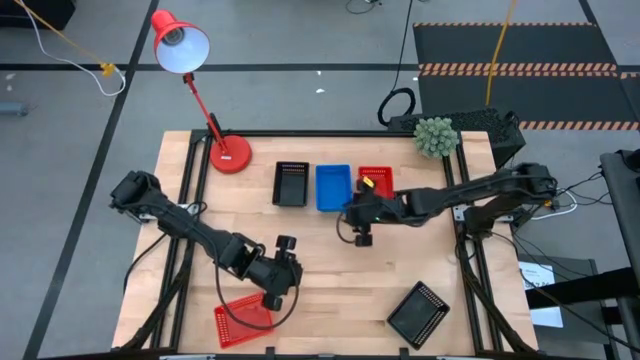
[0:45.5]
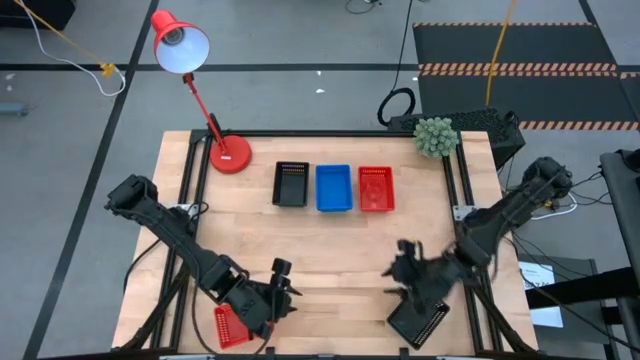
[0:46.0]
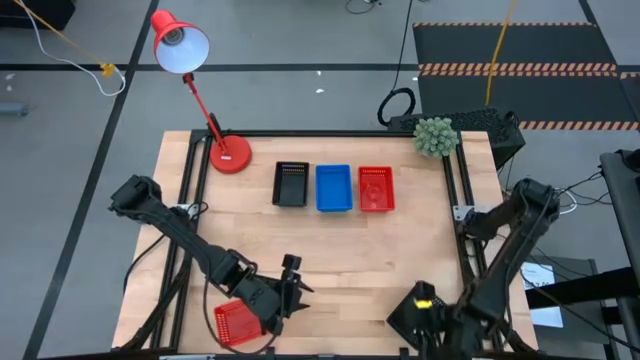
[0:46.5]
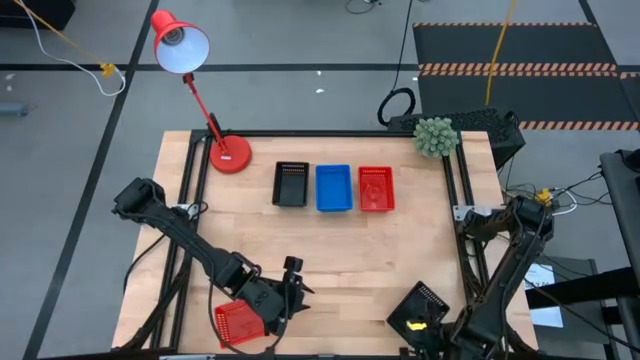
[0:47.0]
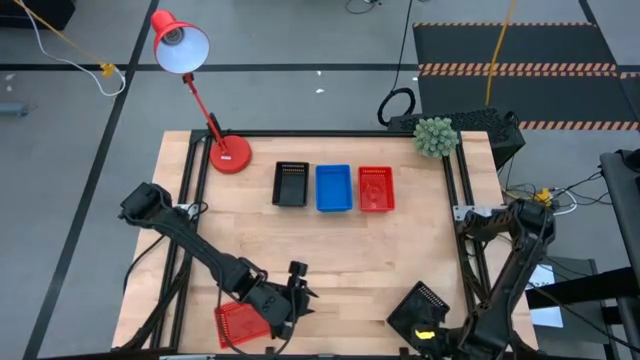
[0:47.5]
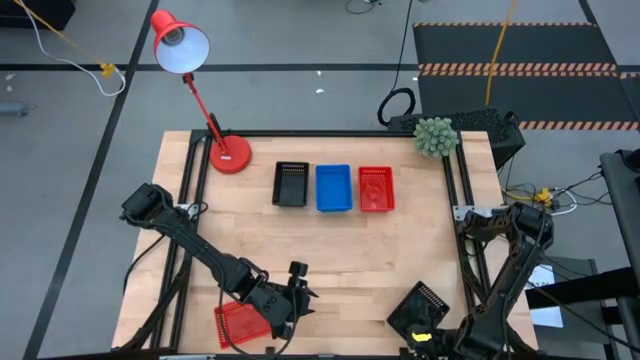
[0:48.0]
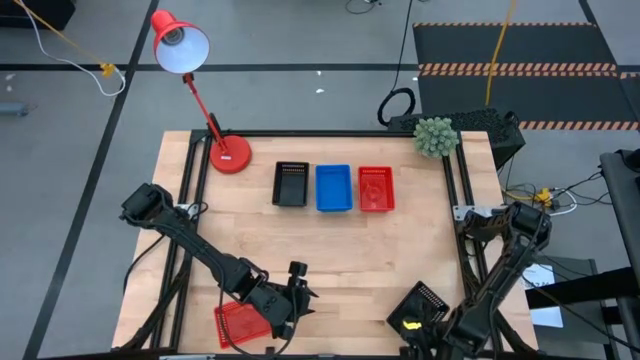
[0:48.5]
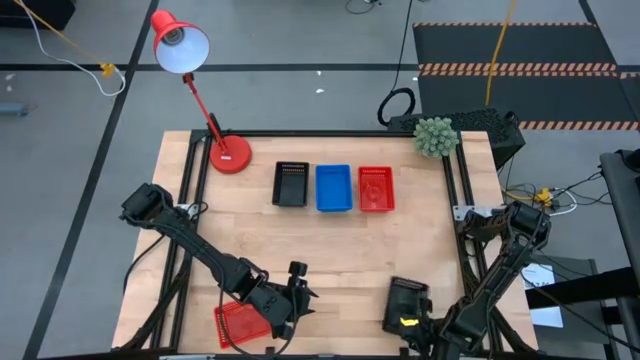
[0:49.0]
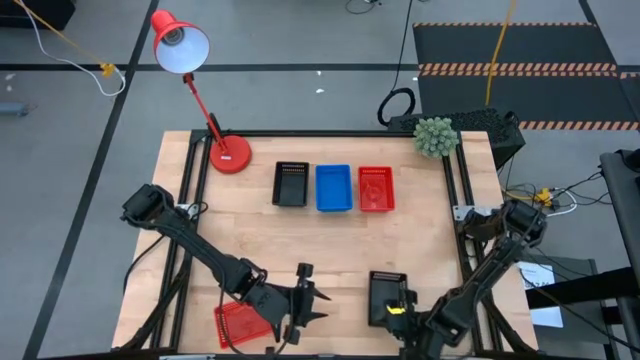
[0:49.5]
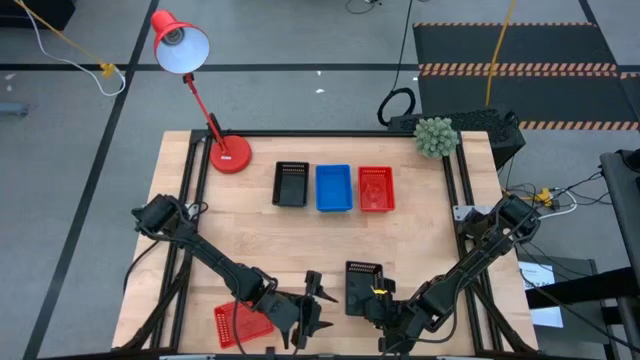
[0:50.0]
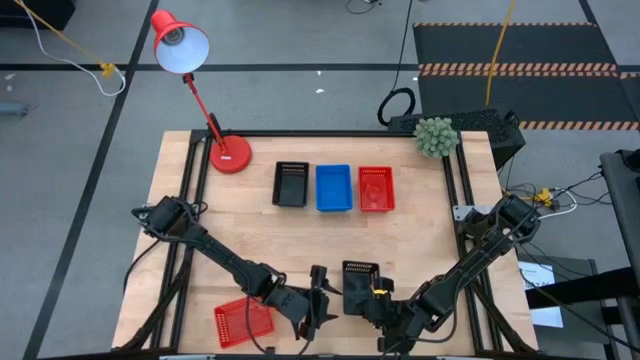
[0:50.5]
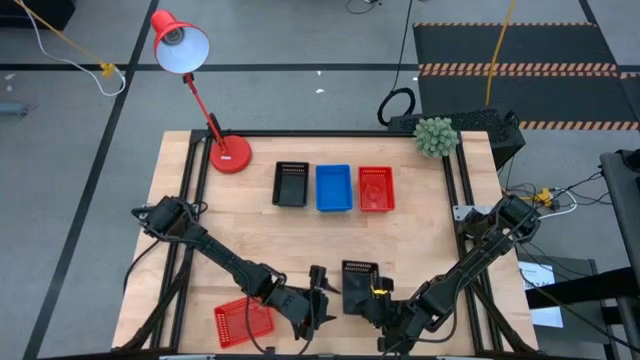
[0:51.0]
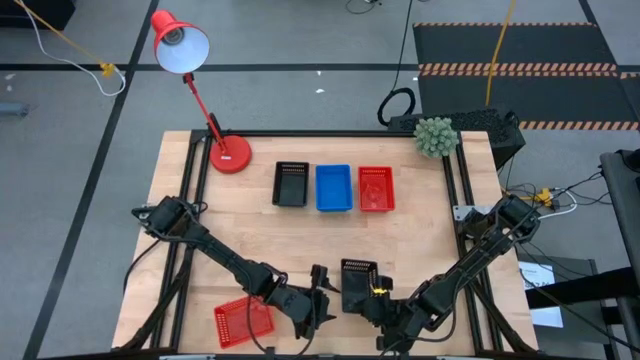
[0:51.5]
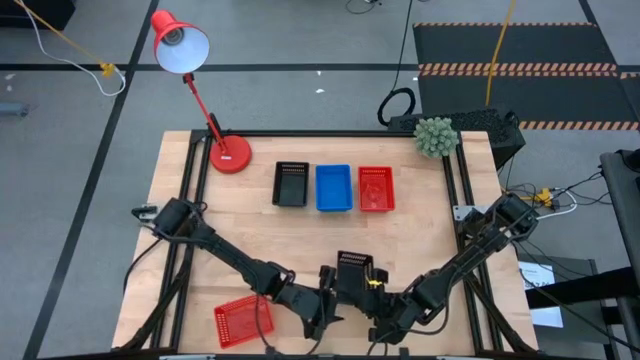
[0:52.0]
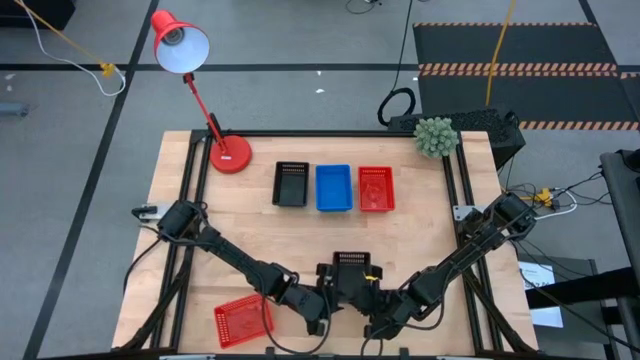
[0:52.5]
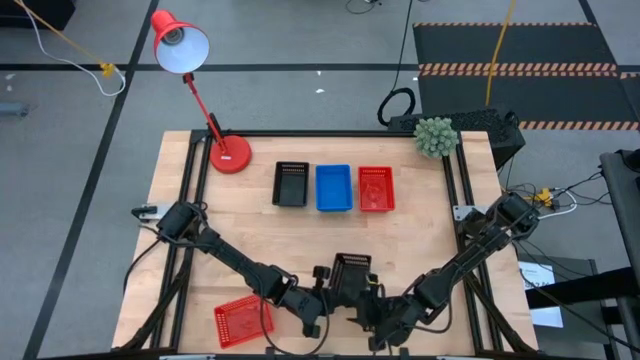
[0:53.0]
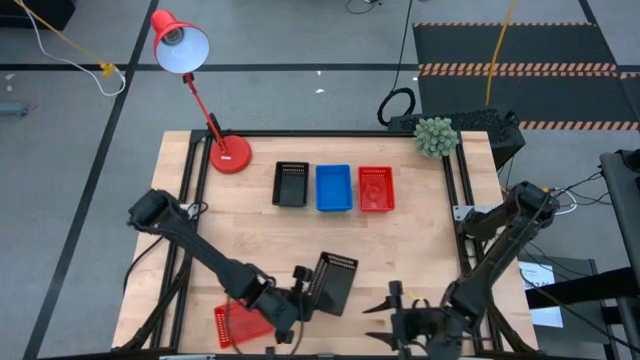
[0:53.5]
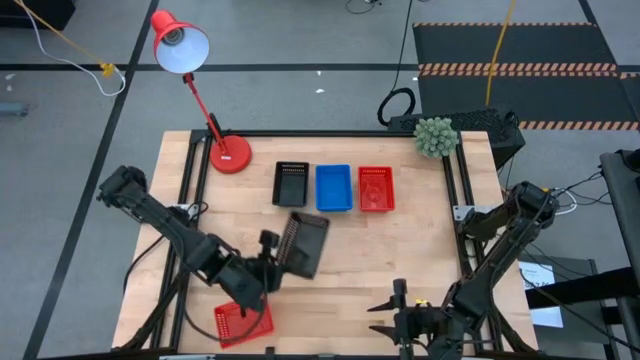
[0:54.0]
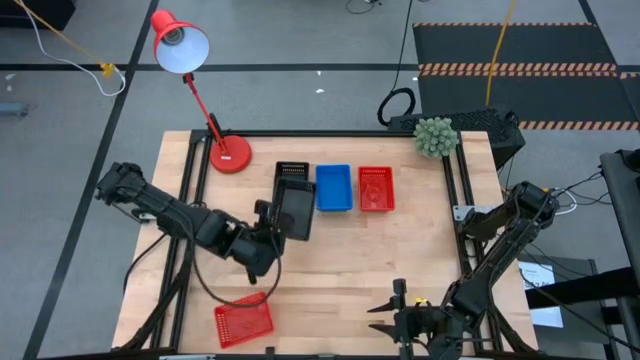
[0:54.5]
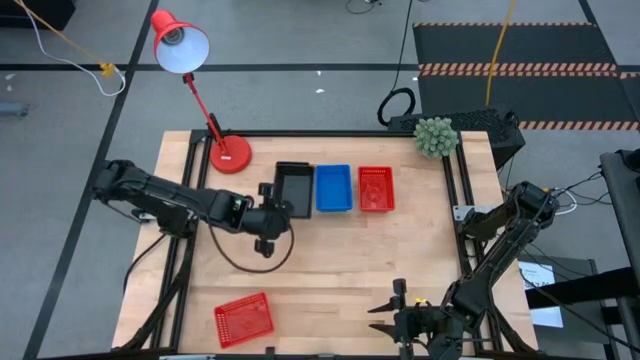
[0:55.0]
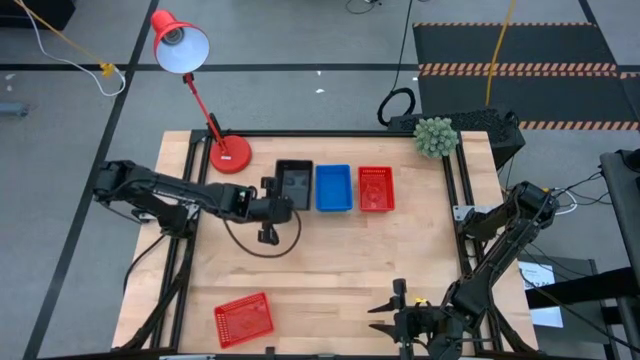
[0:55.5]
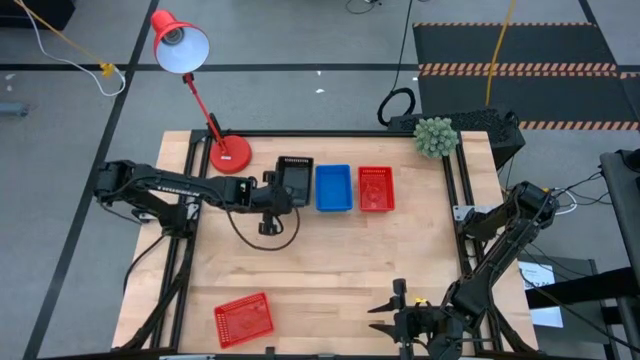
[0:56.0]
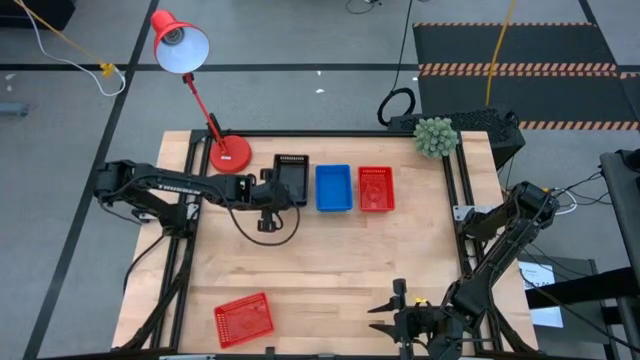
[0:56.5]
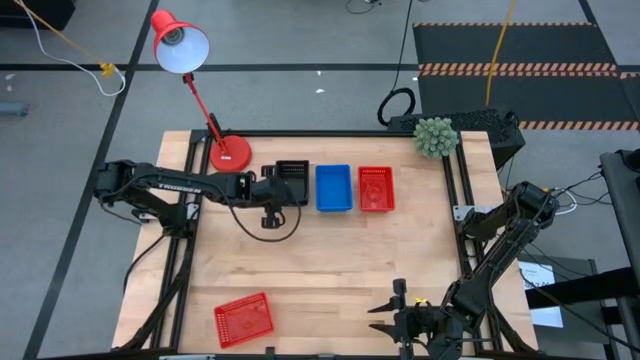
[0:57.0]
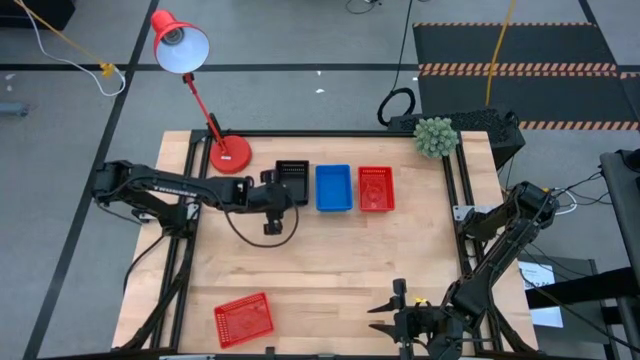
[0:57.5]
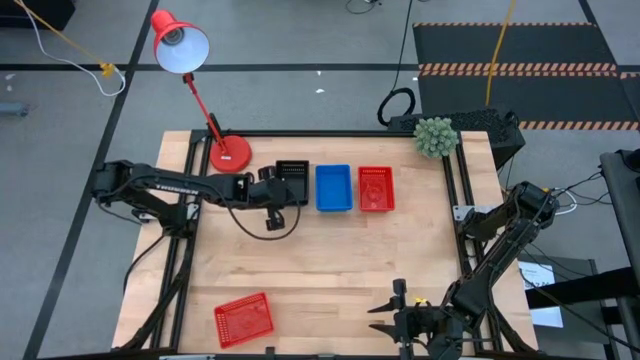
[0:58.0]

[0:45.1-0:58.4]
Stack the black bin on the stacked black bins

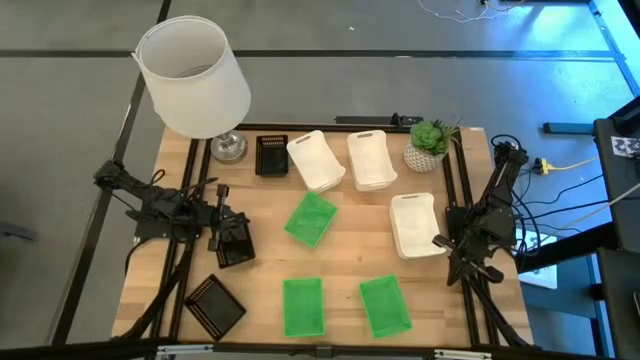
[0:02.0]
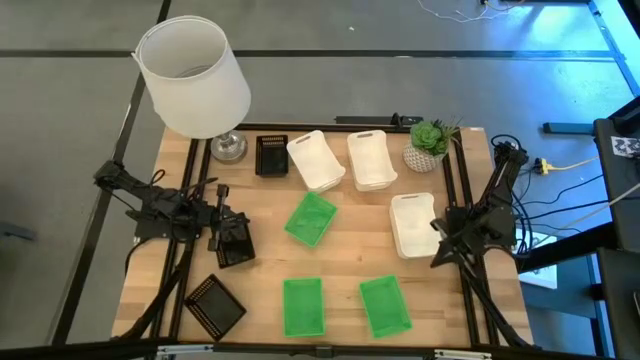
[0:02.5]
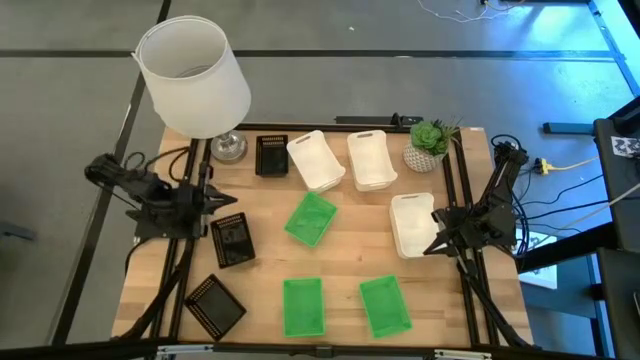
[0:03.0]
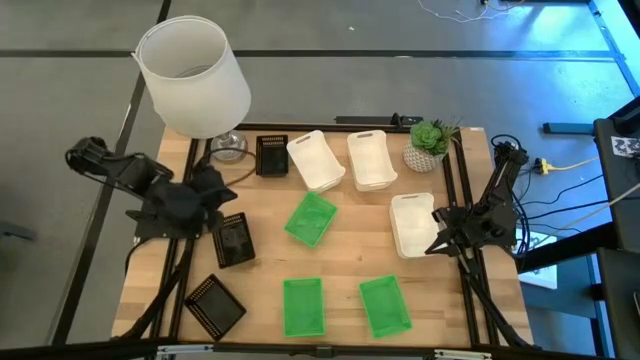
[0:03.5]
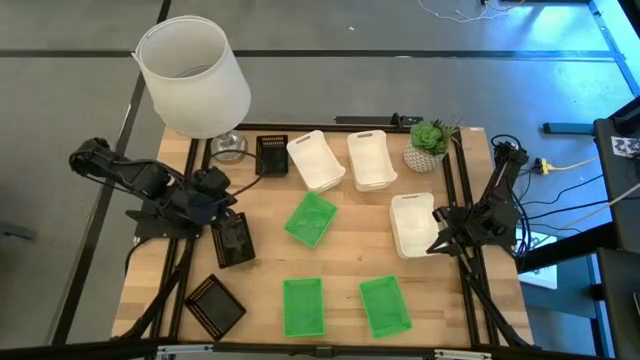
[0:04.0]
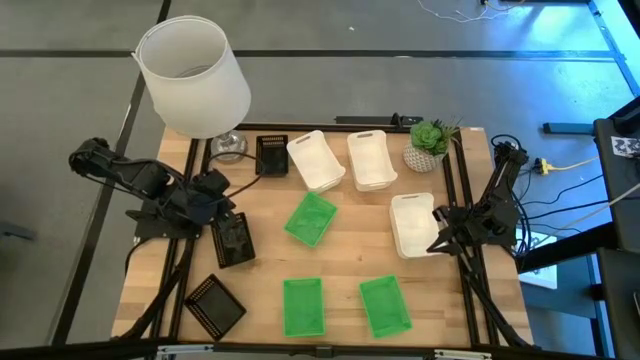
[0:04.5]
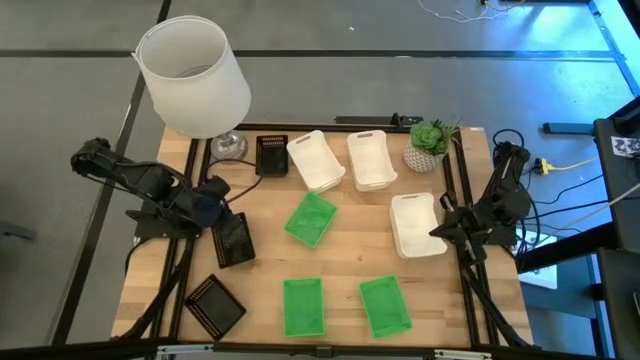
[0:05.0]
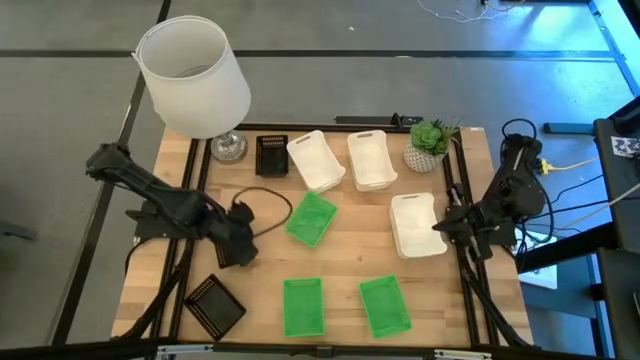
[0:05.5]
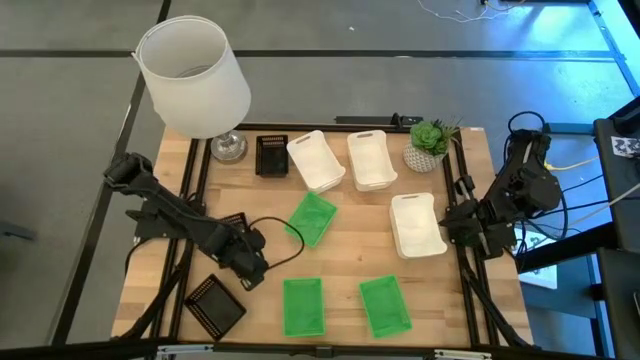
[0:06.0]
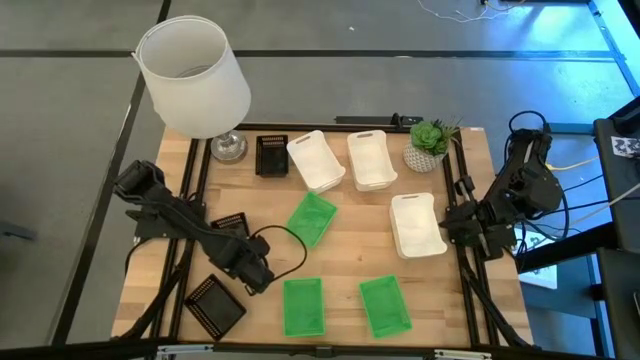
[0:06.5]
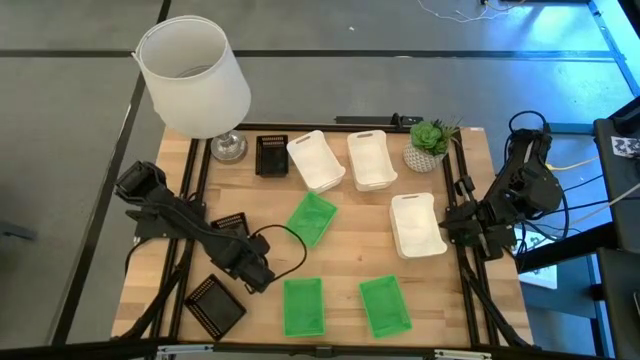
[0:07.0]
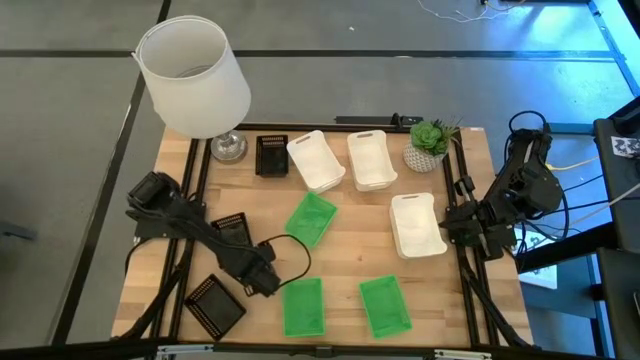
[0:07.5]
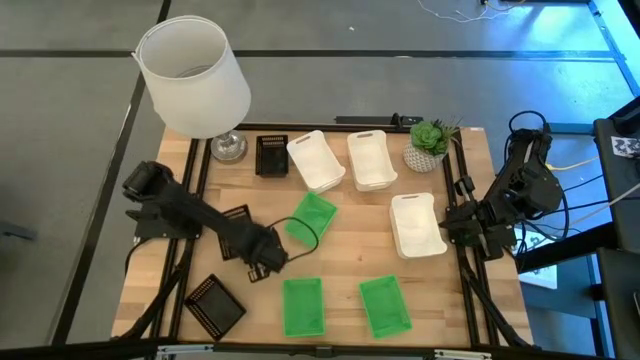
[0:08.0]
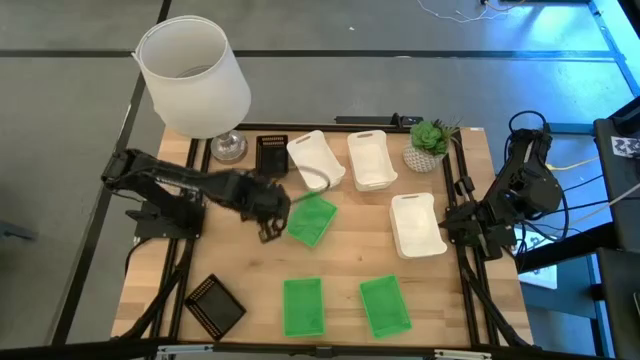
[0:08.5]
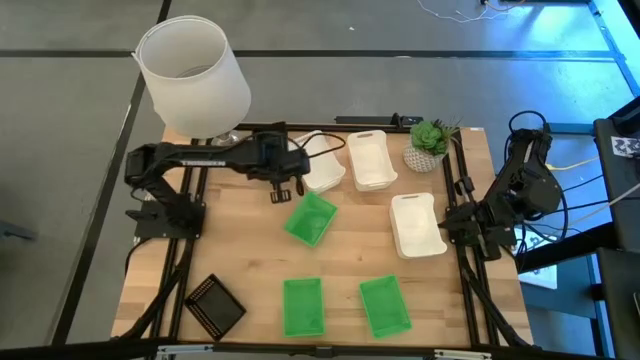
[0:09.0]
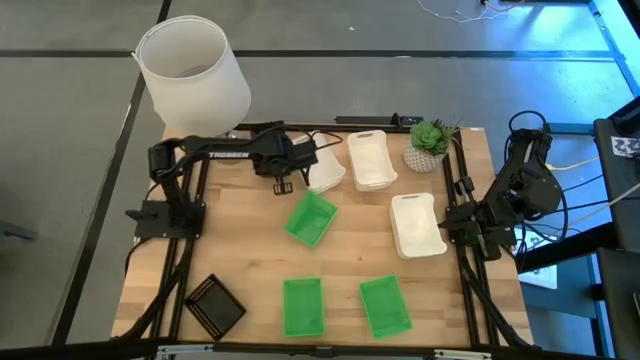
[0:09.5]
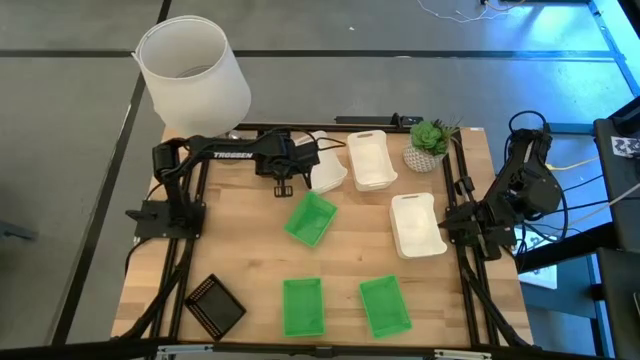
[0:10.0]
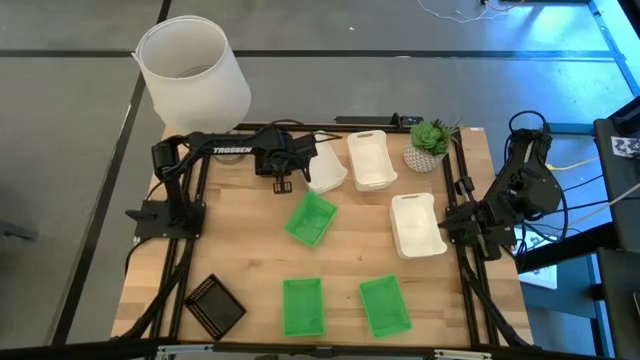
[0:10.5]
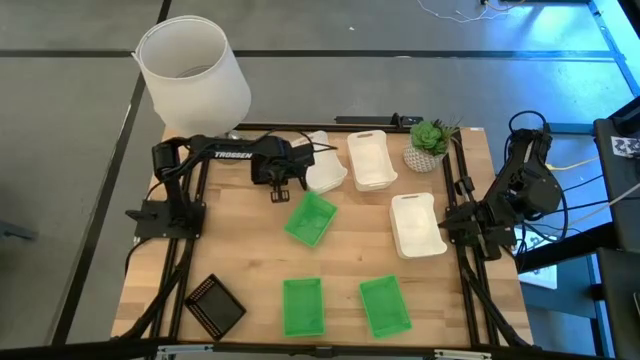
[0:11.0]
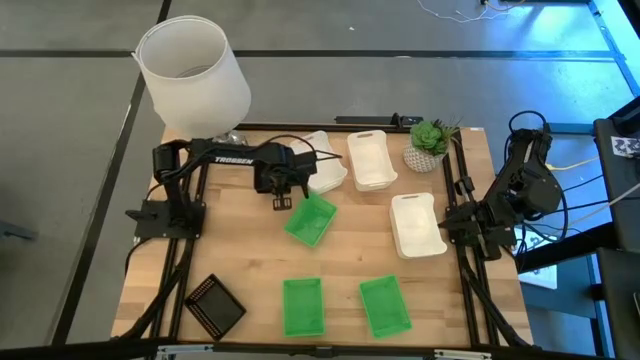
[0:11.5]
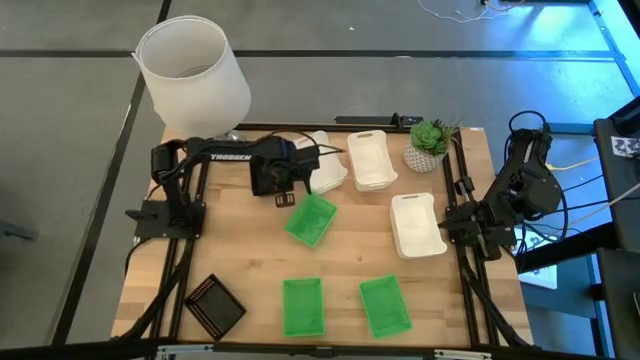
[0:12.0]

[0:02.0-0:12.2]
Stack the middle black bin on the top black bin
